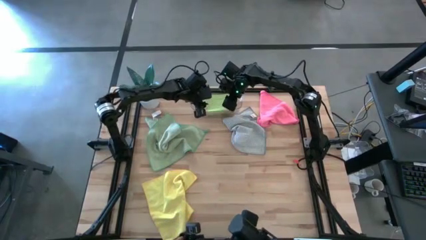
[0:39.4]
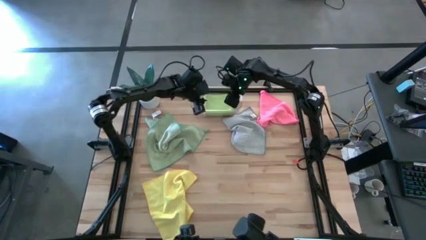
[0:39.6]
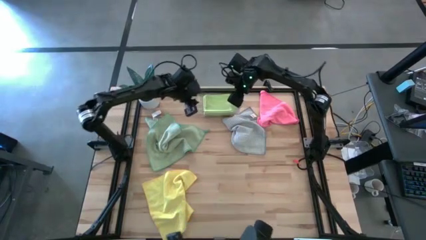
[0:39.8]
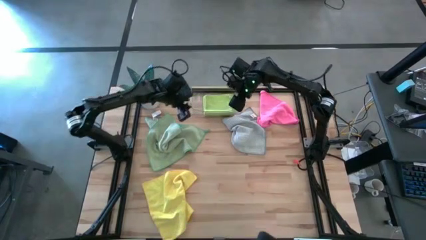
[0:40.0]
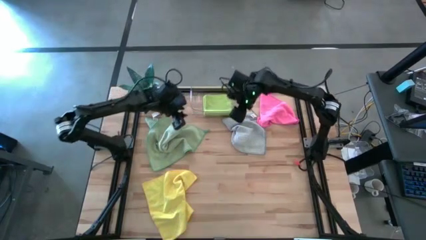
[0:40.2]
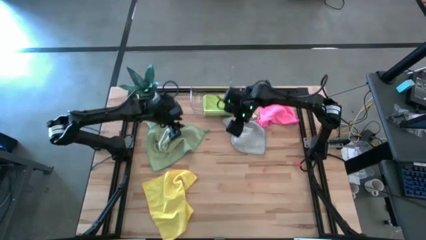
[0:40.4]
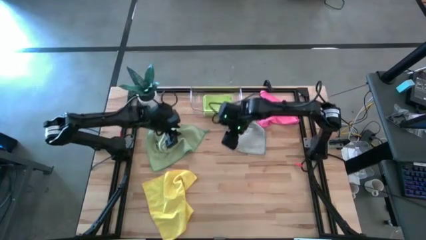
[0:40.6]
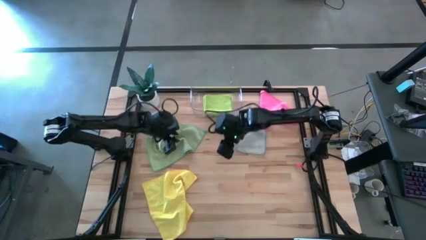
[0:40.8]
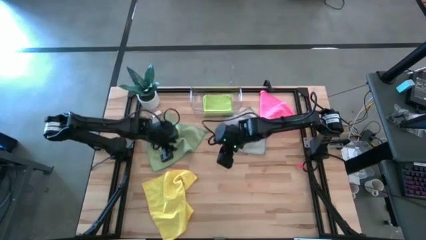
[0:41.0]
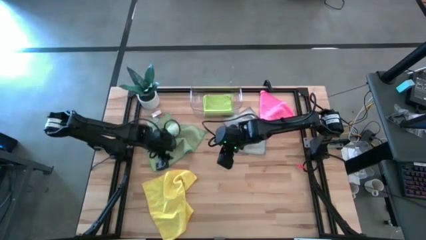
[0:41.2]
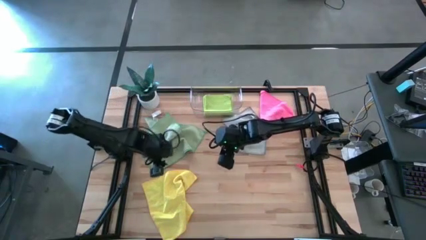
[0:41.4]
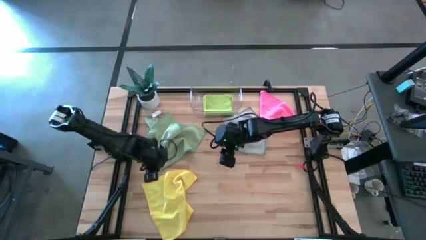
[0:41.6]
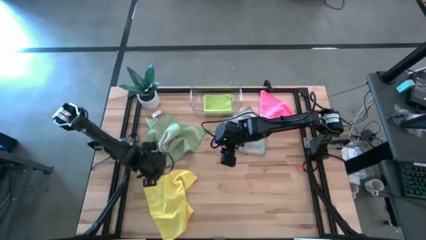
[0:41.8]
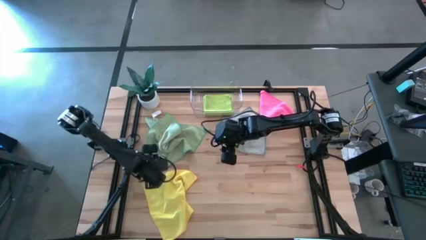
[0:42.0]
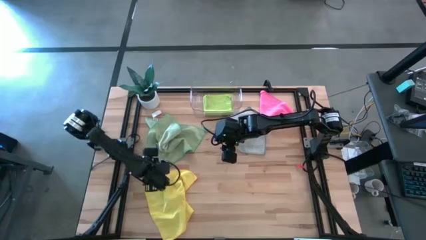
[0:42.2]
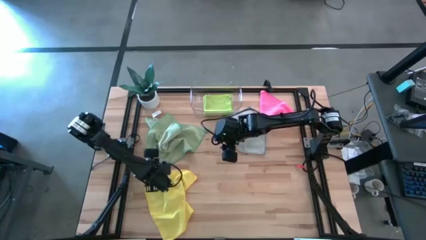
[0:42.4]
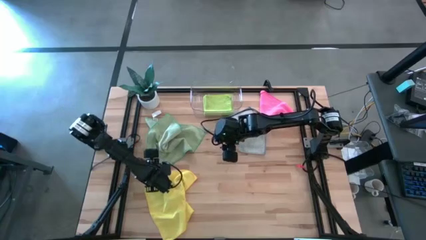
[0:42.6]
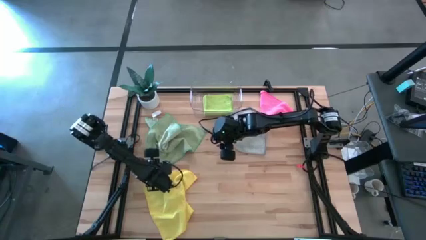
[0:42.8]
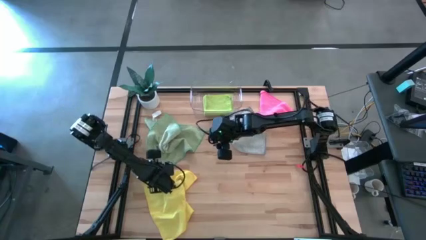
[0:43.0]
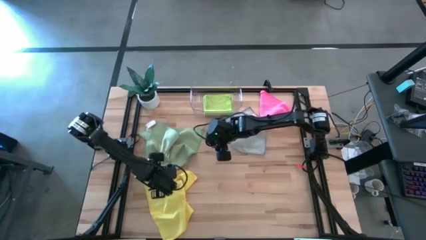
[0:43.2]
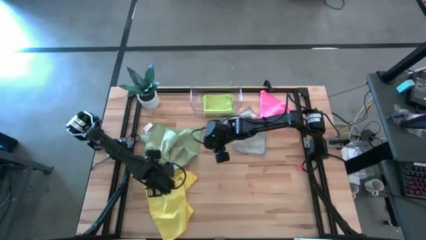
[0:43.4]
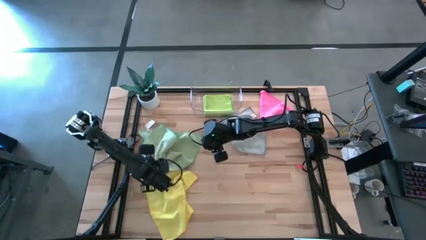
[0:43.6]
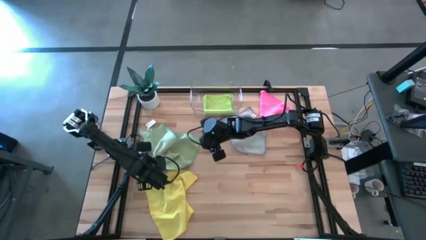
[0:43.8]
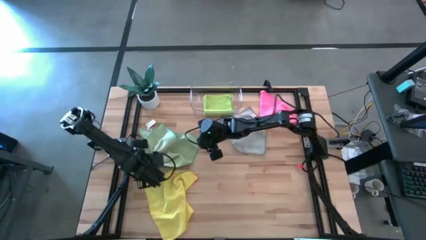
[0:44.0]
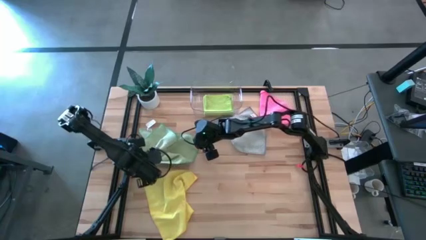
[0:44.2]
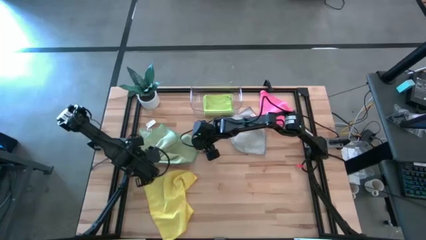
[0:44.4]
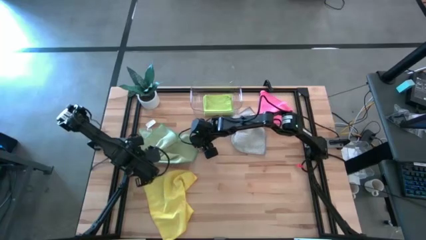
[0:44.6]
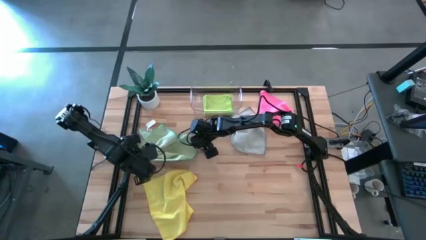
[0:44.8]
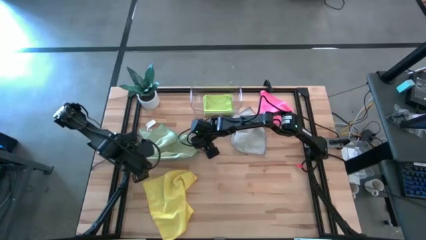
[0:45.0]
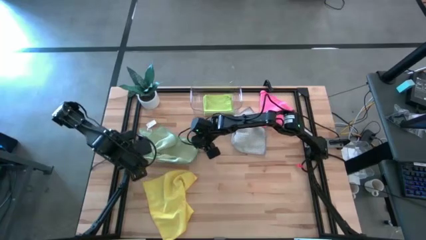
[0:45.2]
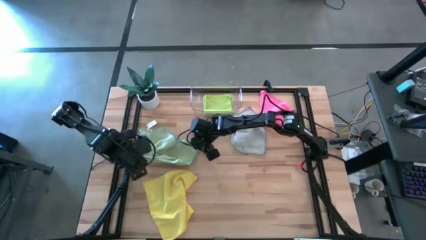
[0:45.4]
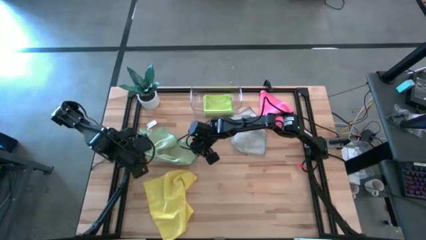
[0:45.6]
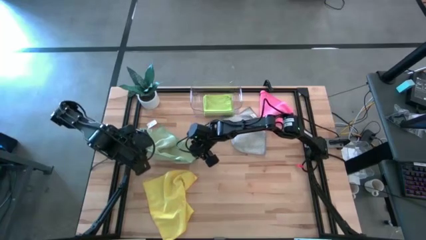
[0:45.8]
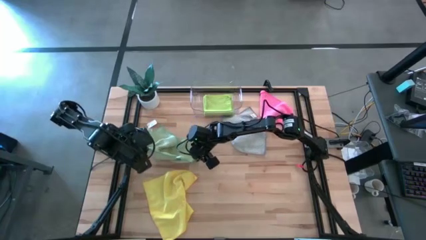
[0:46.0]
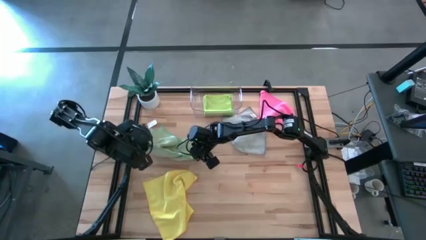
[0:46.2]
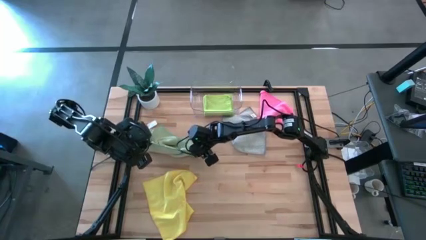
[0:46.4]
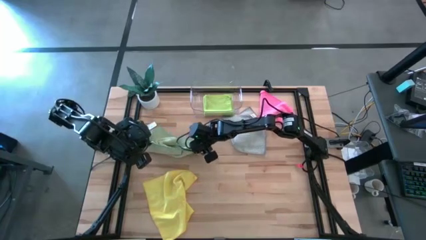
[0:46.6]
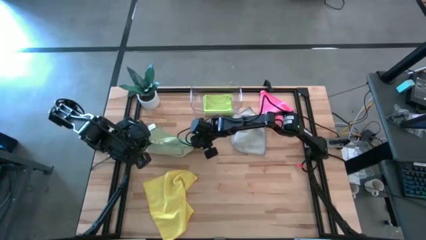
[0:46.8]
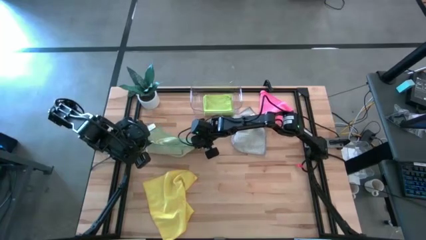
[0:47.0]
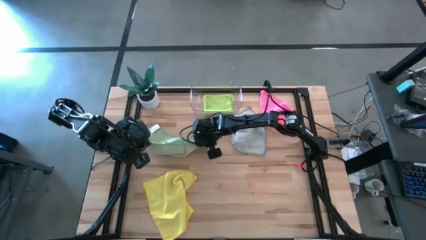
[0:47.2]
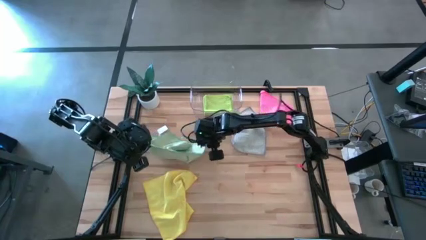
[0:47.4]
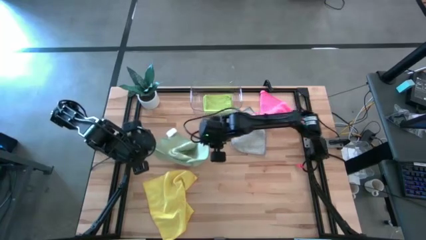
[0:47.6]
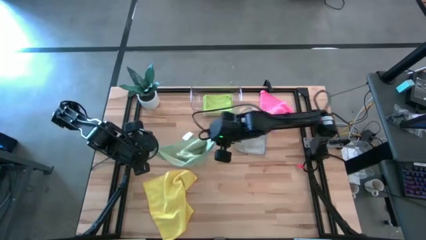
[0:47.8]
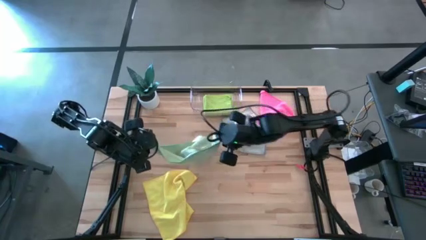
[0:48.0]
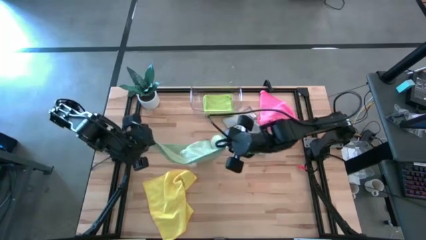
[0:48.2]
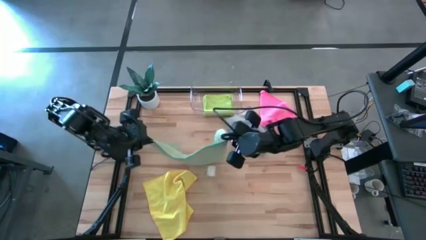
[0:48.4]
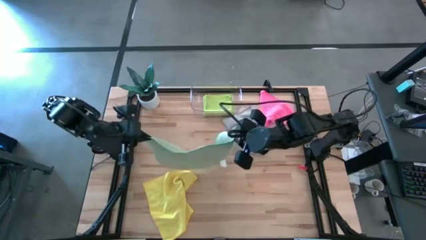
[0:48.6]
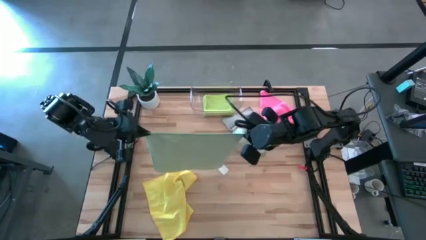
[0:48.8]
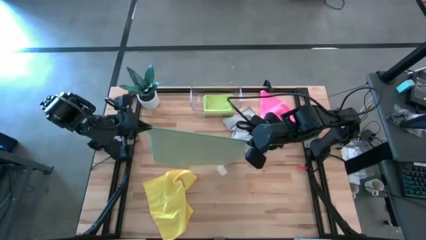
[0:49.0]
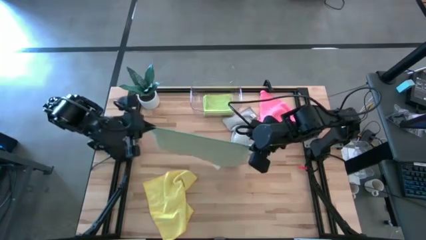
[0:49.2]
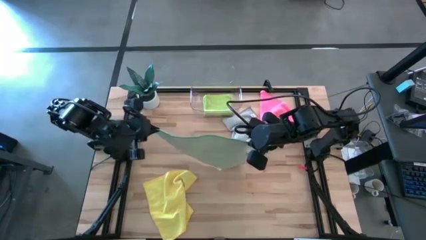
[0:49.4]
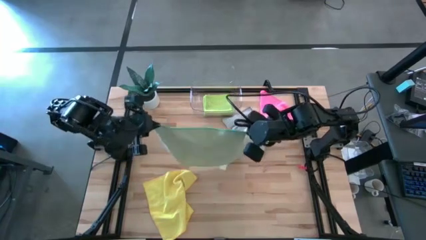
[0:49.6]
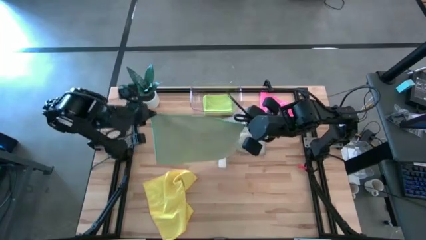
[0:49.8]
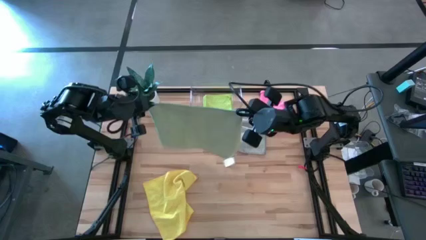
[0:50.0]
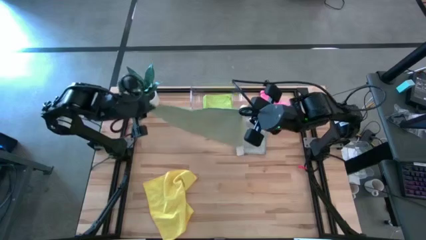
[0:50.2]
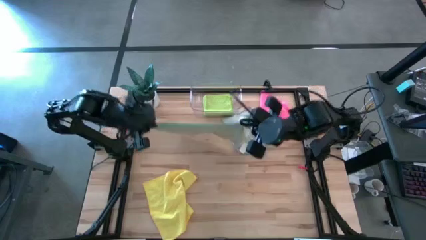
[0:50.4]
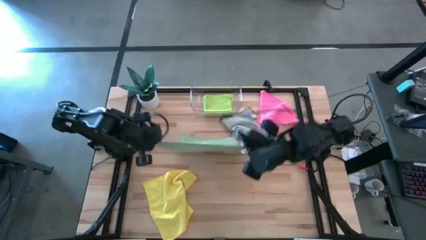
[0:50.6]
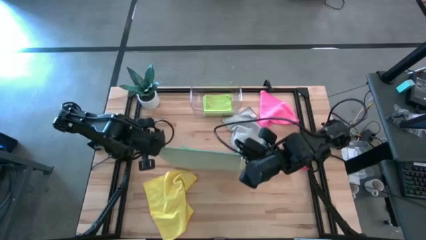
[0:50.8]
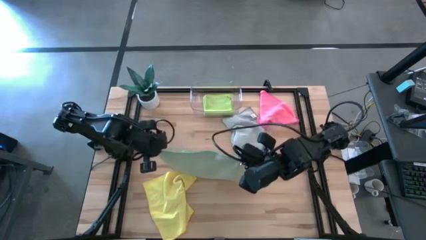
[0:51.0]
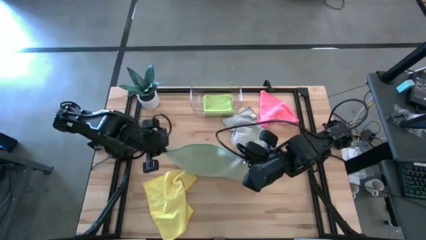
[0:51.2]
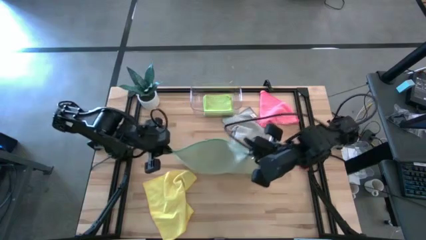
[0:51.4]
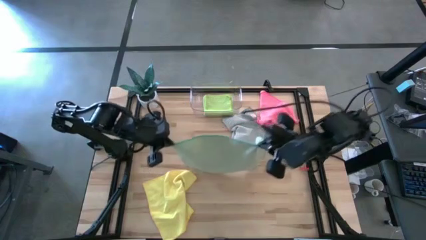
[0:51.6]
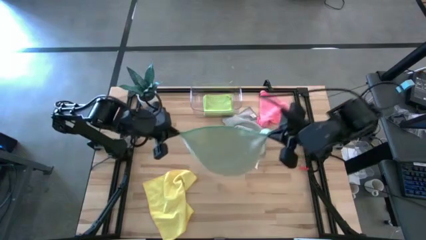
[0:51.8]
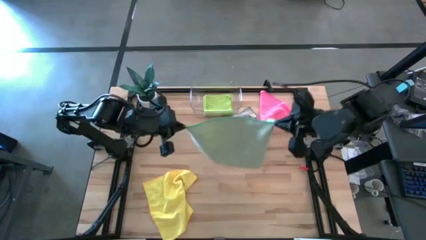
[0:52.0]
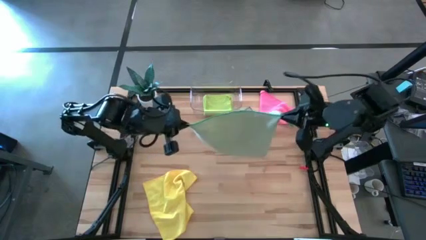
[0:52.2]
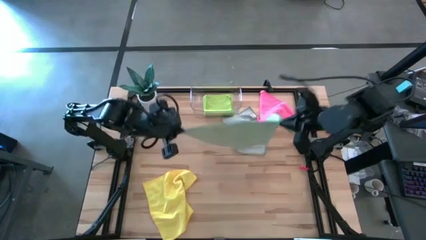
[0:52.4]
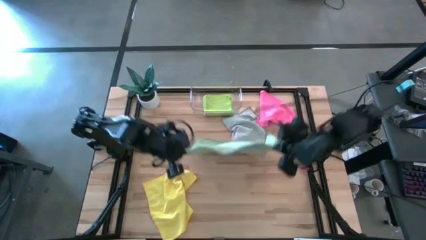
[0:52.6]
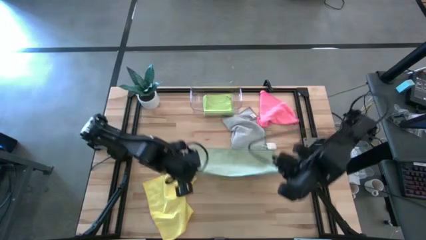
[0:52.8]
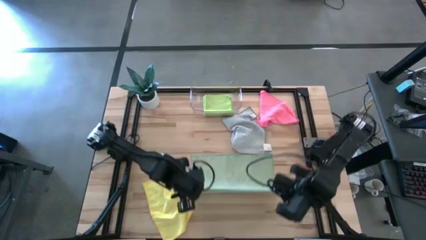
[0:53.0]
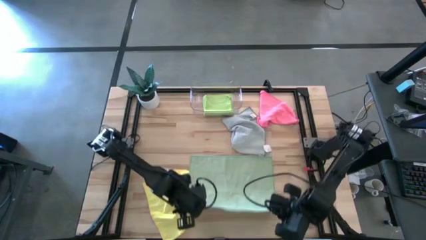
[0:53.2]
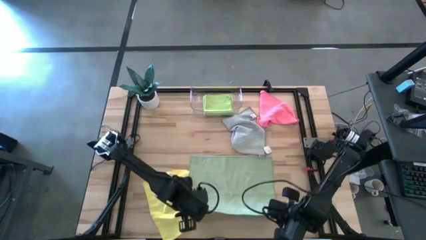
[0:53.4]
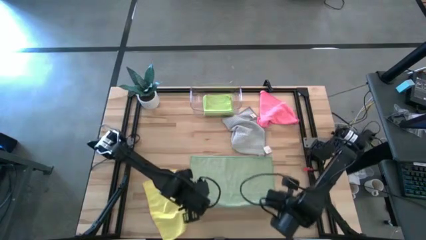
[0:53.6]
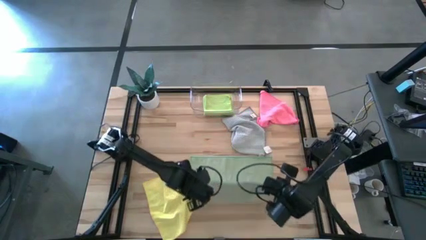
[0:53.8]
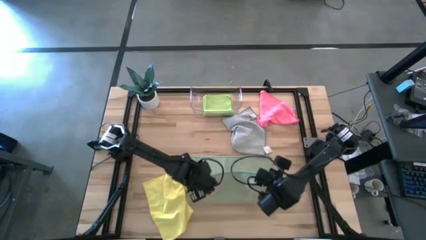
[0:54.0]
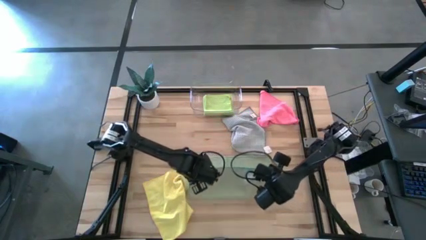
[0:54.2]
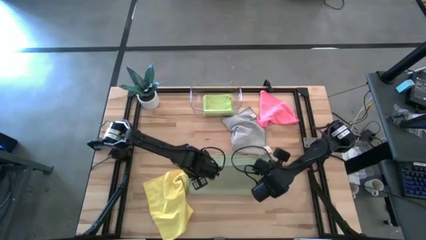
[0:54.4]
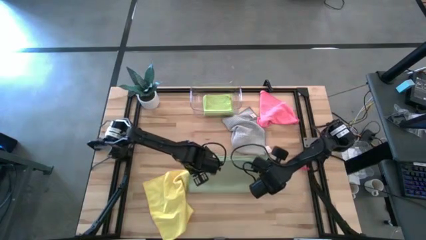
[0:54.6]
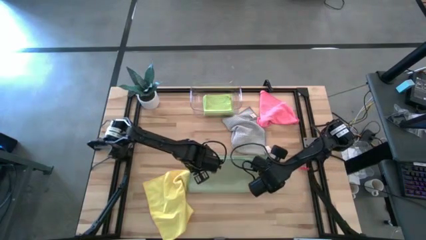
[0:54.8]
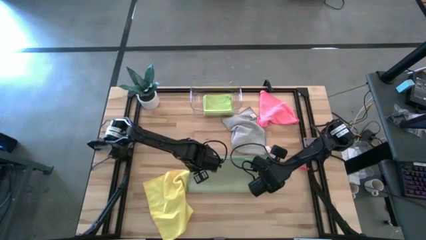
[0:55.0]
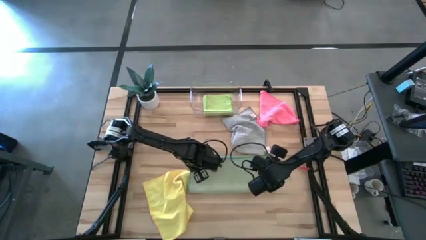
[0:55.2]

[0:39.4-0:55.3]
Task: Fold microfiber towels
Fold the light green microfiber cloth

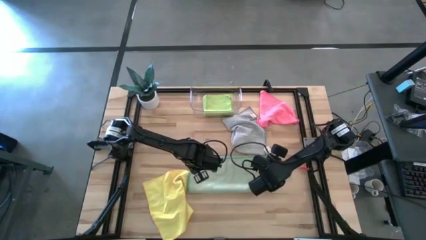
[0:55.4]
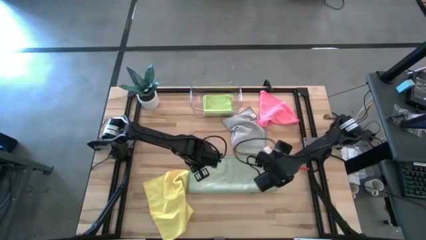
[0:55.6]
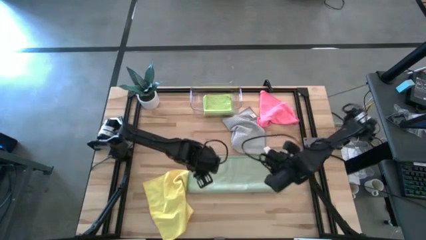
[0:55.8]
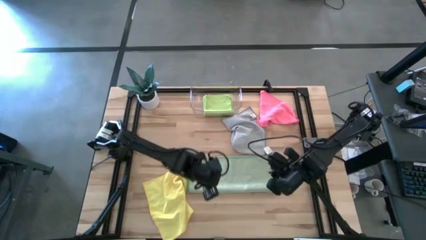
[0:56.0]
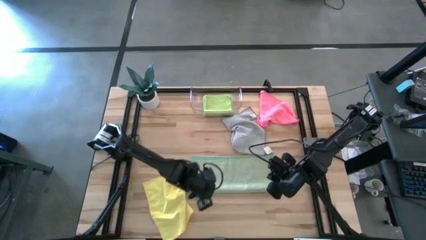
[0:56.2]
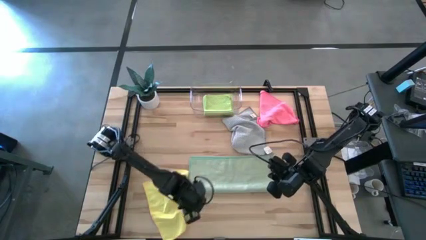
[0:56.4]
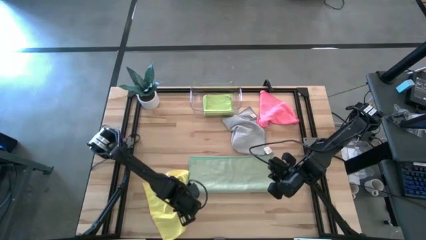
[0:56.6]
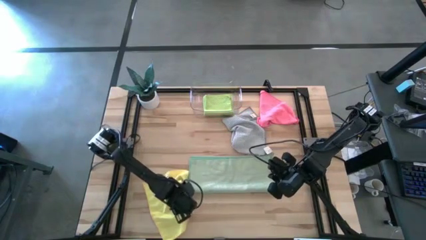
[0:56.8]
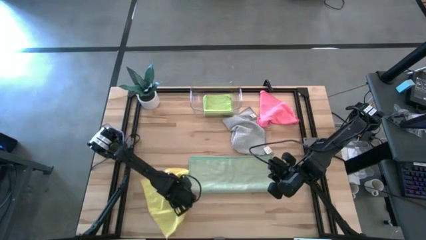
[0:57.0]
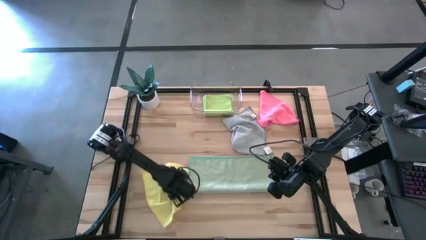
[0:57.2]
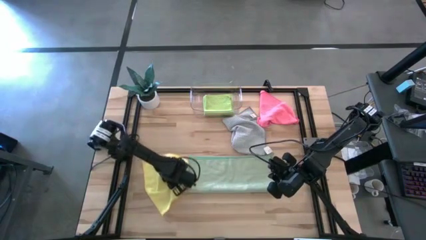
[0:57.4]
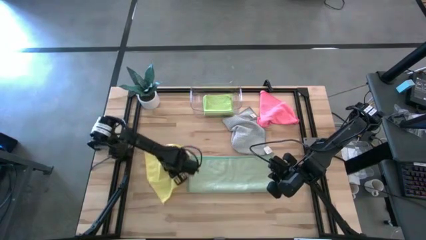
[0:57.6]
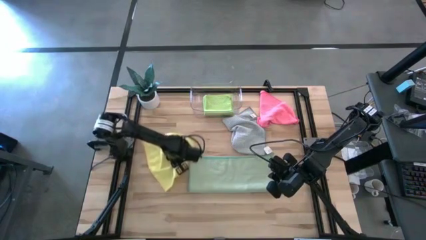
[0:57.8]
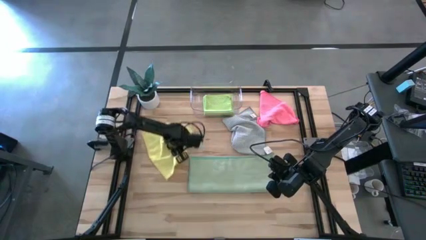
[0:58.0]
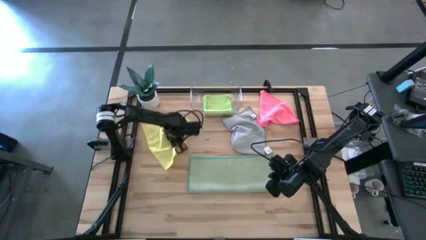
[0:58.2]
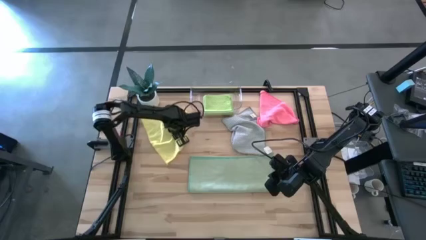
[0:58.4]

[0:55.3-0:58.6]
Move the yellow microfiber cloth to the top of the table
